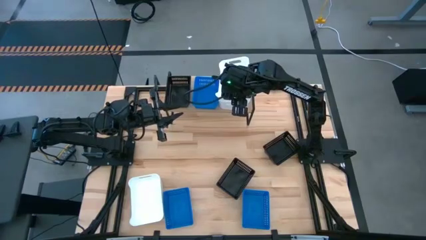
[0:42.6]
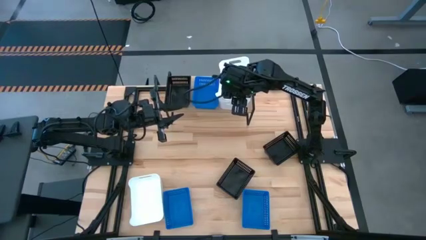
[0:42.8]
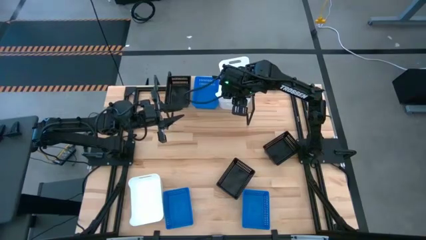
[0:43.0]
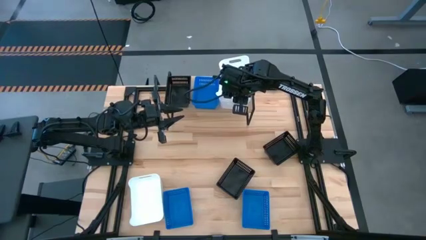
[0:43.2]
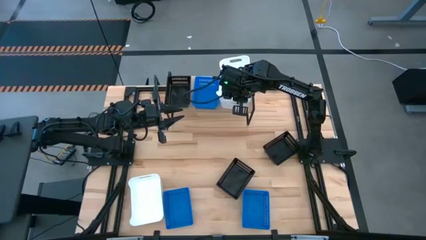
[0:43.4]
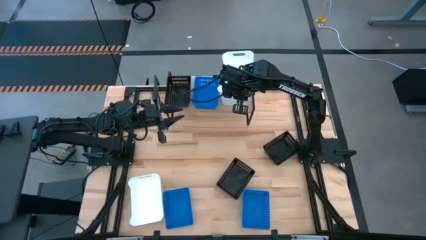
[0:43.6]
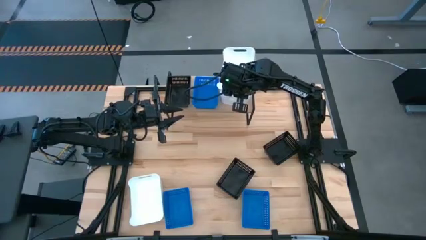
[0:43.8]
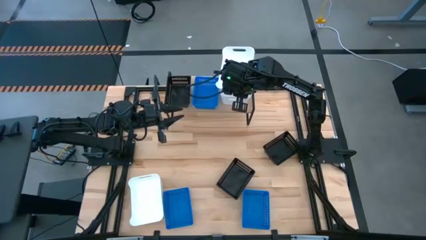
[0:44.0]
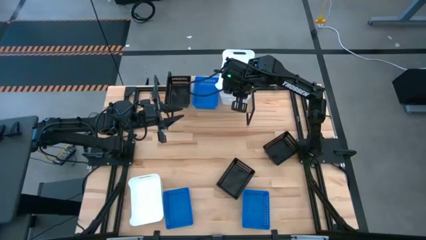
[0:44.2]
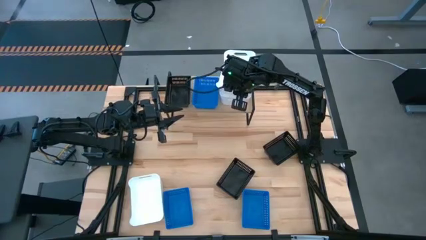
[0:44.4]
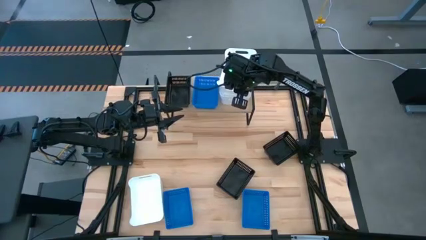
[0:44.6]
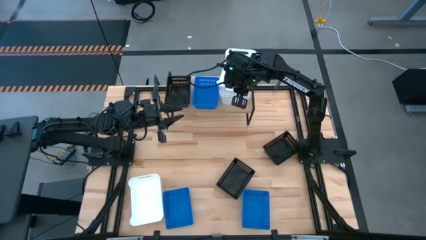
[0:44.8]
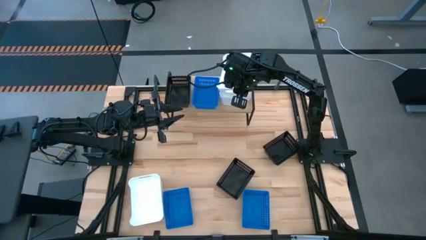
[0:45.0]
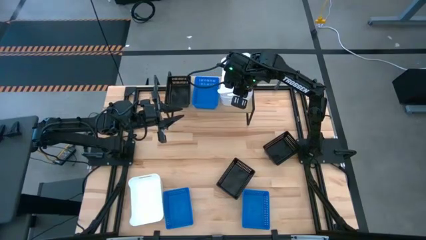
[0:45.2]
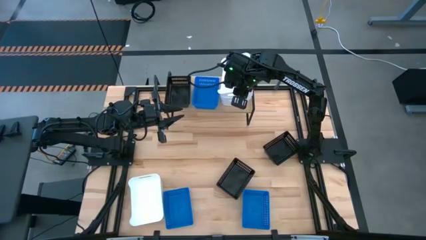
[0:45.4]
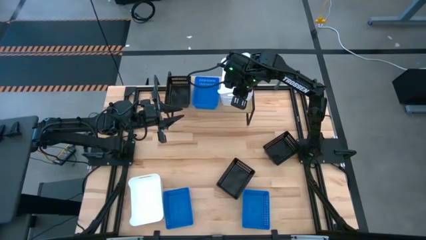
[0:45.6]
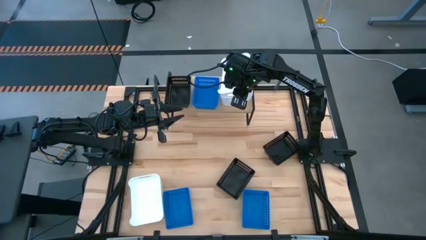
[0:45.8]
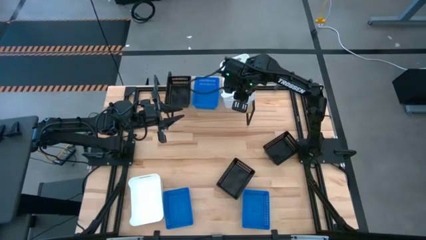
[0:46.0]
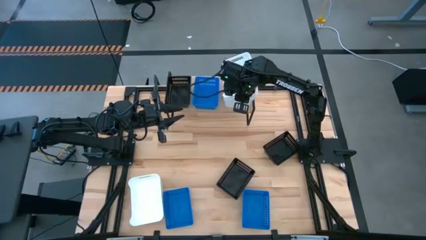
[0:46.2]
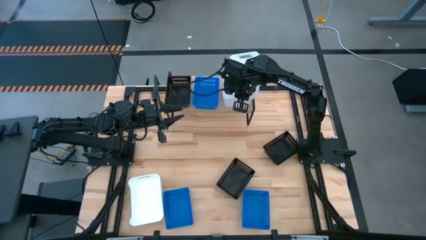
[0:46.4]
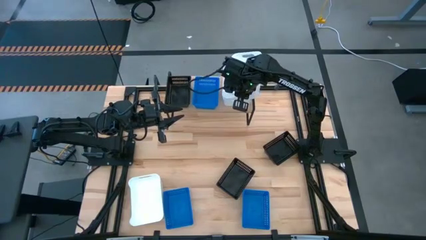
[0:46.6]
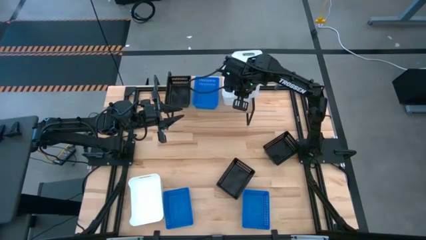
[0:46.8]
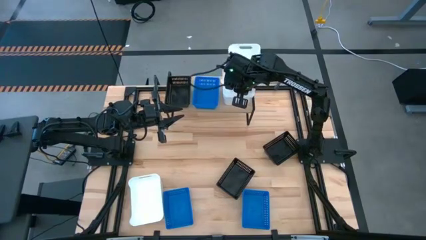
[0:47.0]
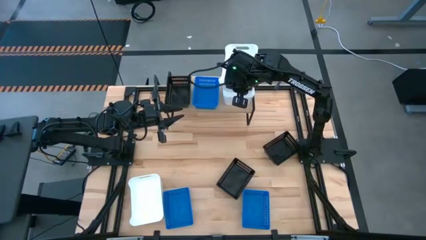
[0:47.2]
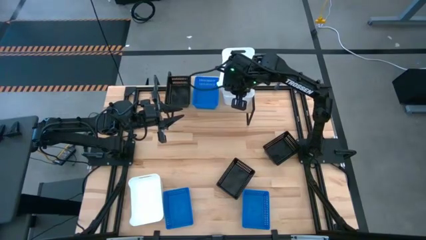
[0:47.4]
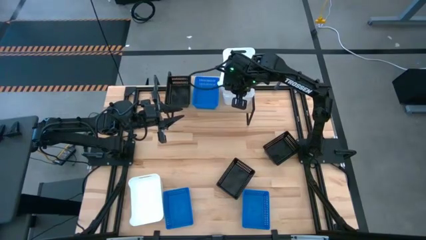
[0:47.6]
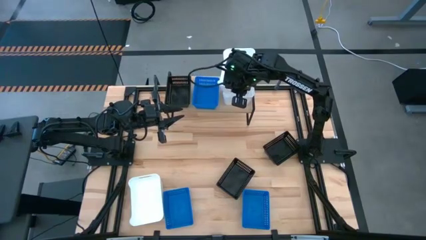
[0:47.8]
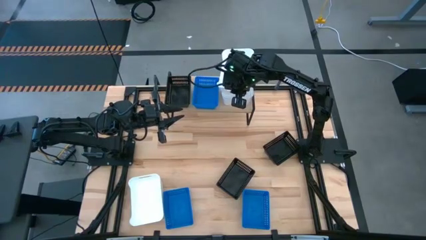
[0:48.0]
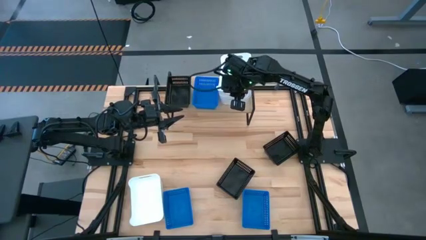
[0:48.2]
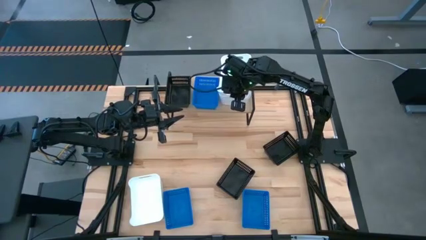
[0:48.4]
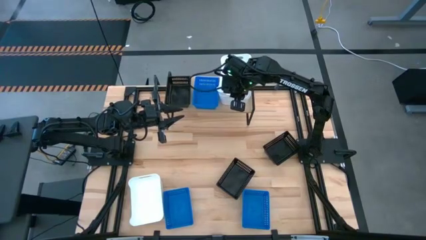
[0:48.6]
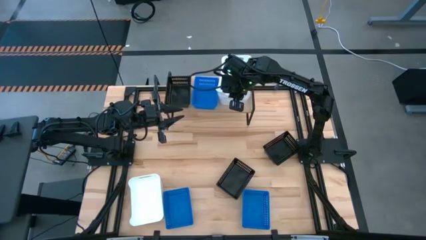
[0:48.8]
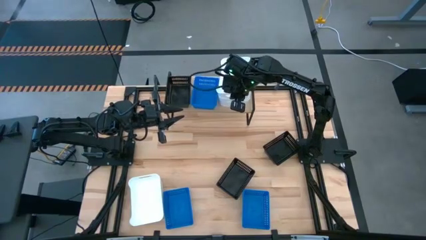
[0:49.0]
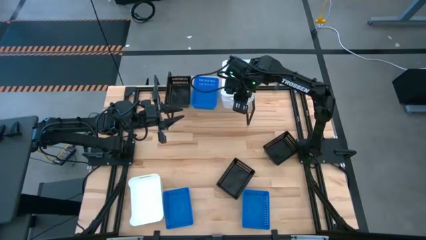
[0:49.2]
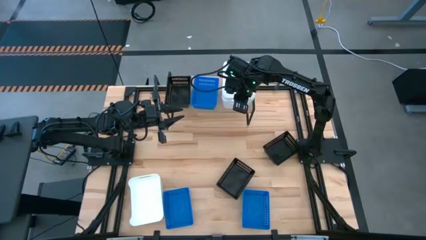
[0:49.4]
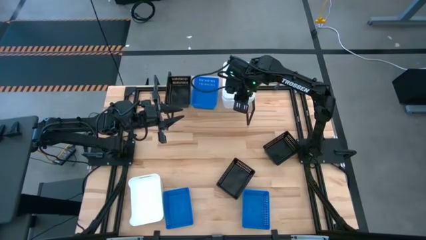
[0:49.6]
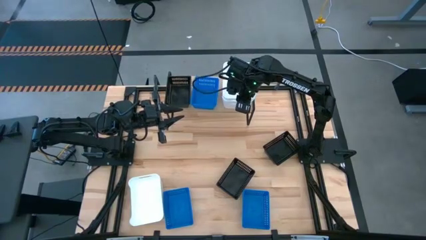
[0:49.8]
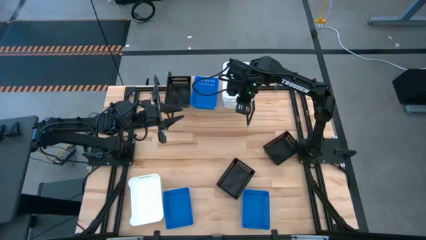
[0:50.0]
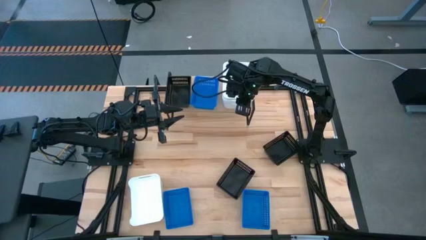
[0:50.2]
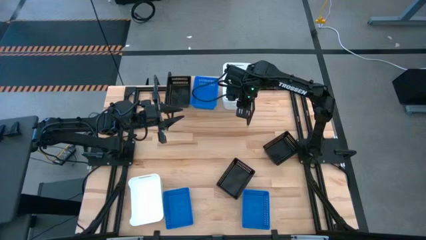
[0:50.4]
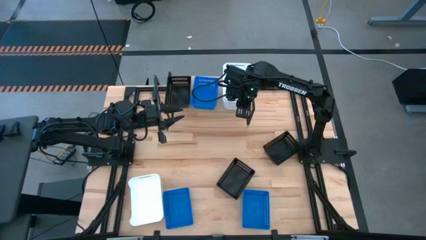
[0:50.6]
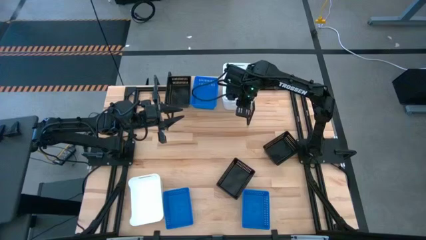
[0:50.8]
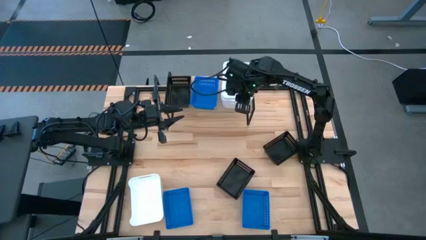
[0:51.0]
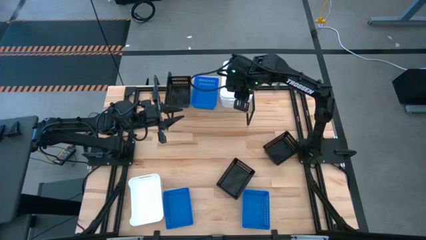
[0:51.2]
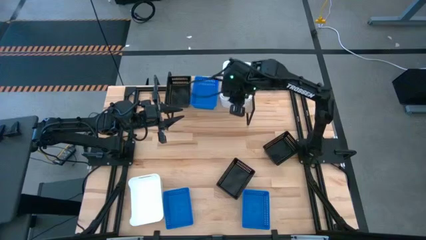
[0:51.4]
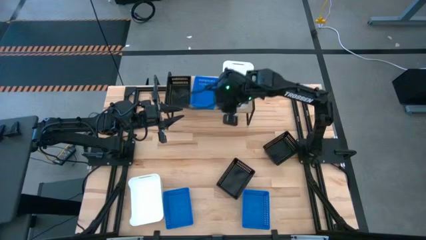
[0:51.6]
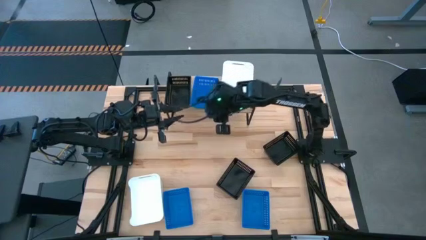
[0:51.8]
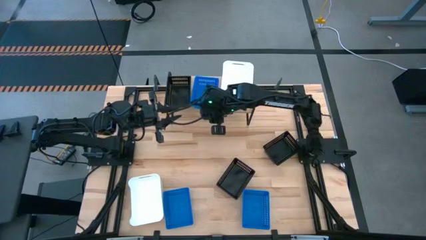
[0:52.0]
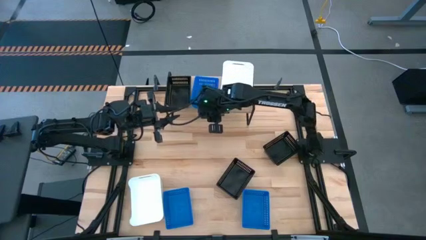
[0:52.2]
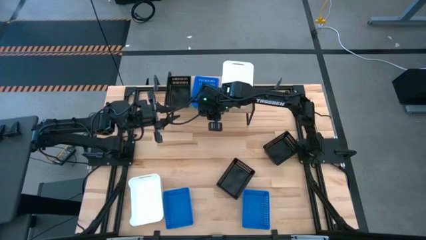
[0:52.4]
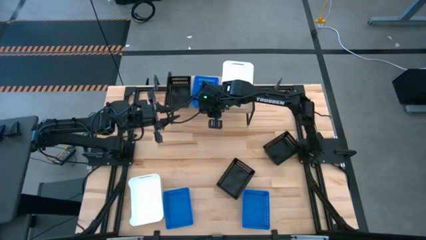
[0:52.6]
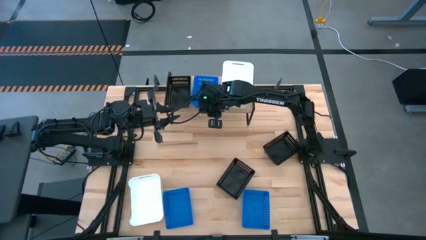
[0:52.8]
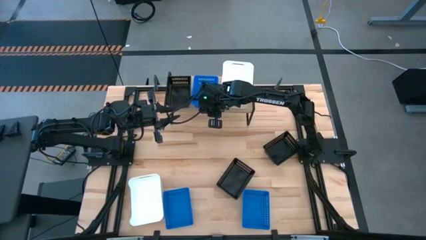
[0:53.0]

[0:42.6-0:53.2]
Task: Stack baskets on shelf by color
Stack the top white bin on top of the other white bin on the shelf

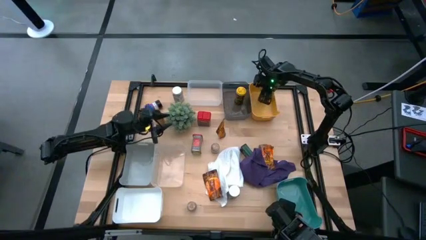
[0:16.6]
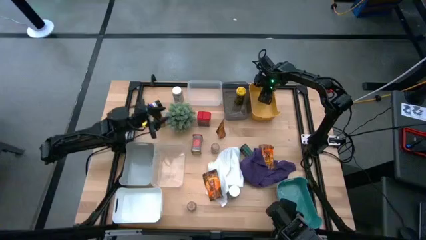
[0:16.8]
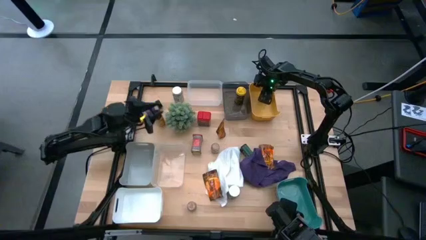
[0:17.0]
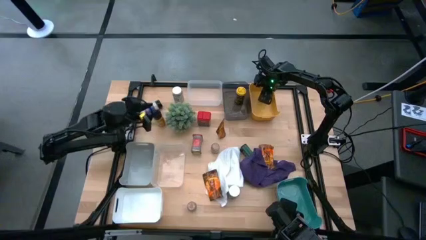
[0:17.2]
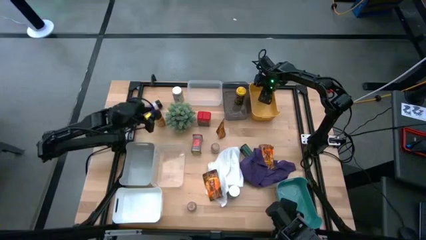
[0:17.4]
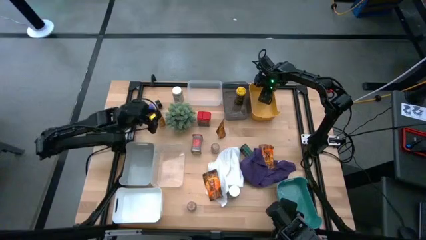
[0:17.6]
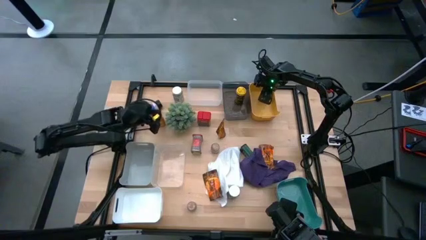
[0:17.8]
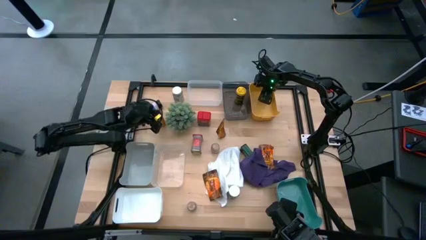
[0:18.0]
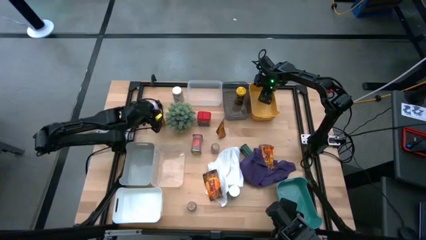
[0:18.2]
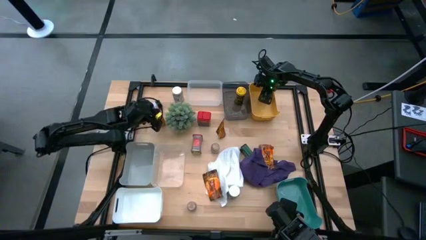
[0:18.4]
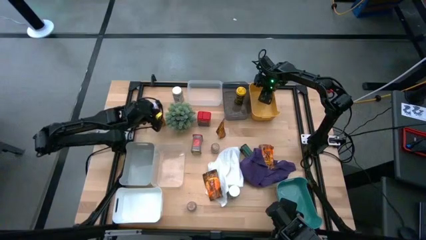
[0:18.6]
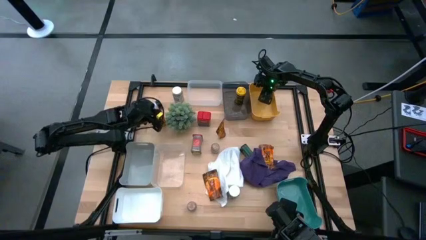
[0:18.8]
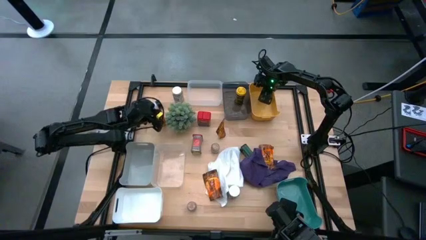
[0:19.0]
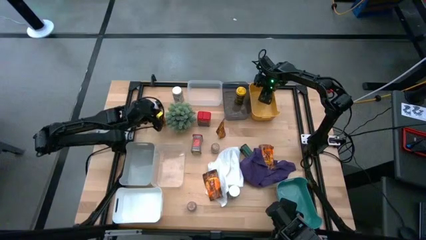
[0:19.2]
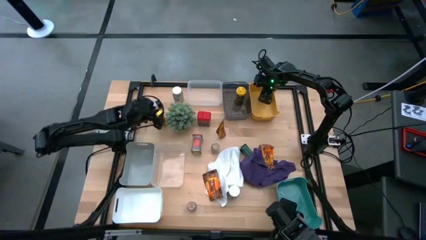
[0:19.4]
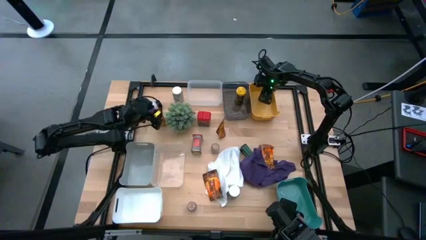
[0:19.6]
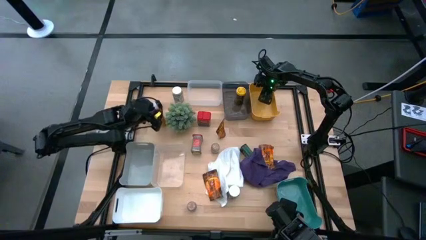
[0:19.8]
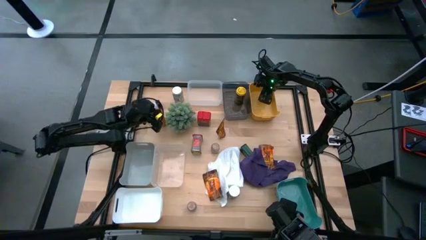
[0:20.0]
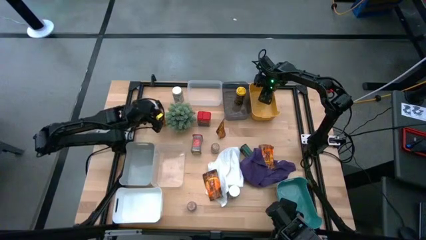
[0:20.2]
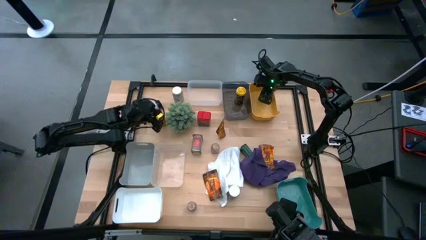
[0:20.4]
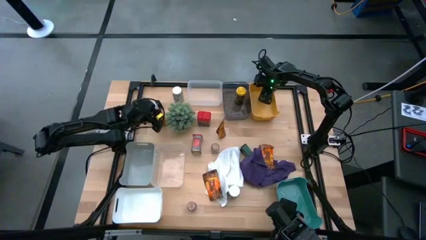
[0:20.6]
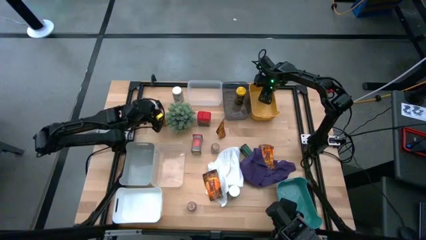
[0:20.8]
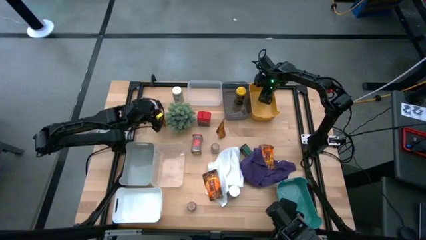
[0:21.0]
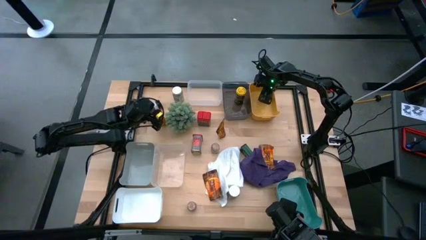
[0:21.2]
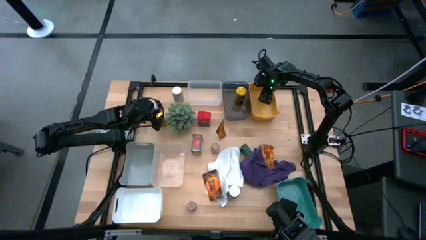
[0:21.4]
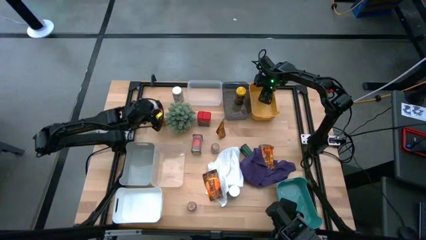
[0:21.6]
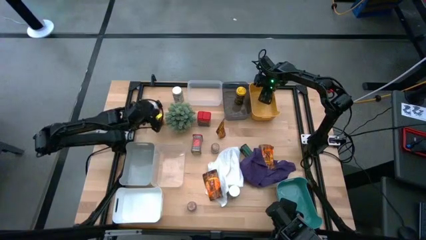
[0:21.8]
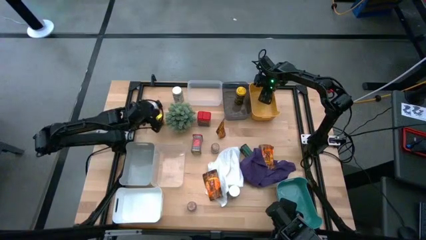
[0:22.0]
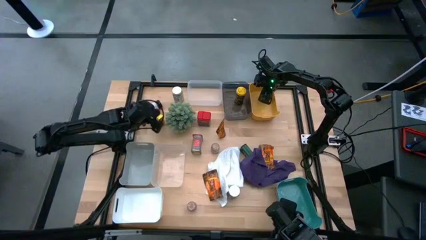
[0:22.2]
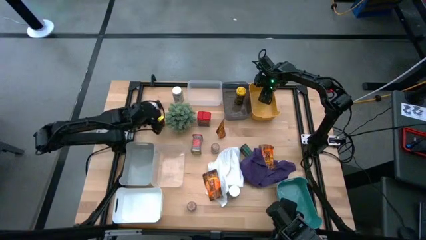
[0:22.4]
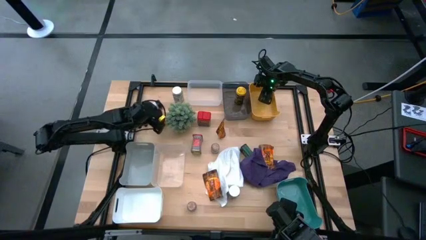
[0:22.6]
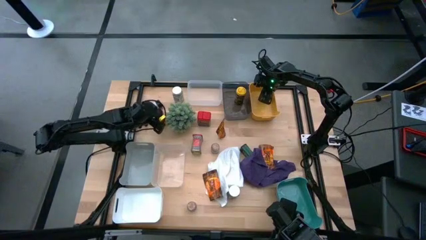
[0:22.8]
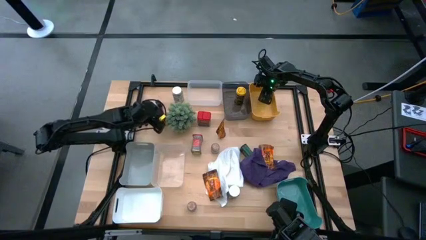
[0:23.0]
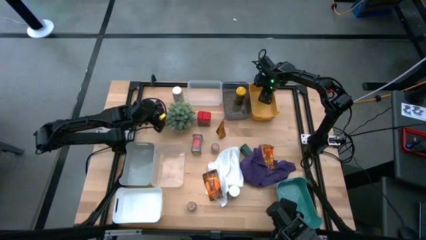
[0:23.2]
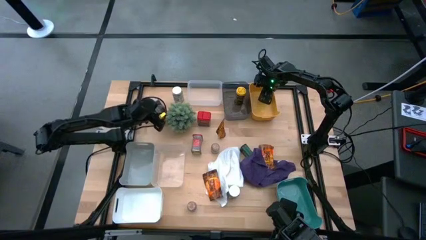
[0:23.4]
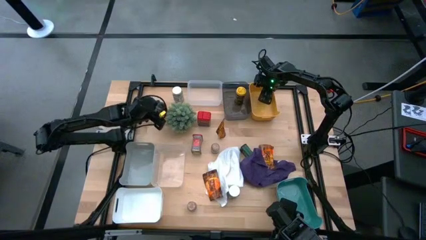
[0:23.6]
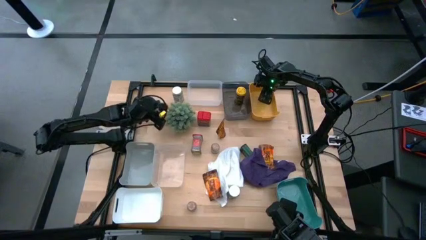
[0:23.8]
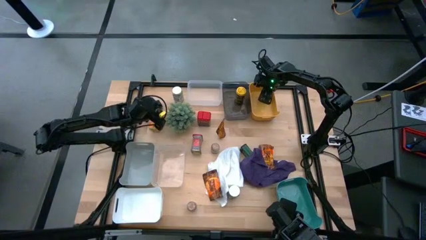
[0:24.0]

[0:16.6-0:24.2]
Task: Sort spices by type
Put the orange seasoning bottle into the top transparent bin
